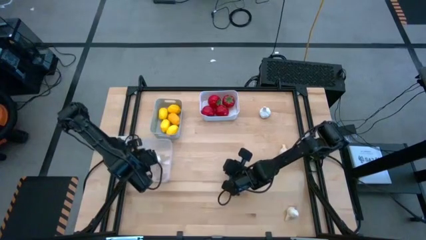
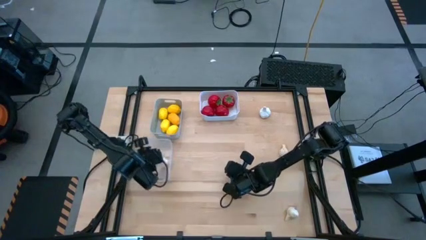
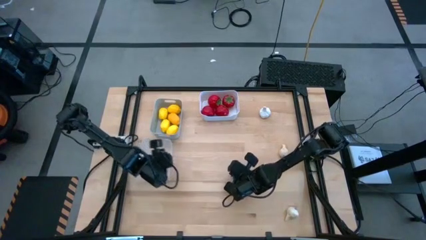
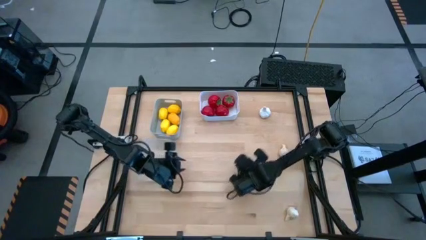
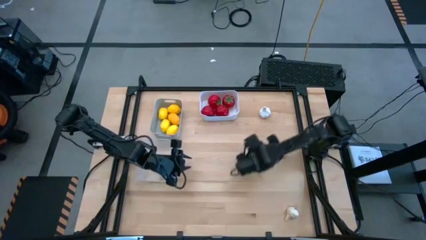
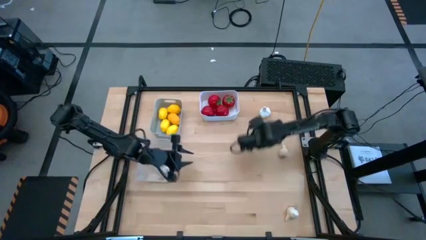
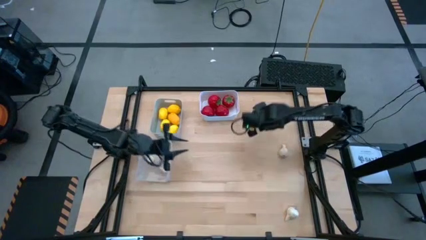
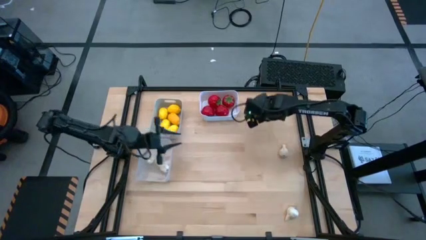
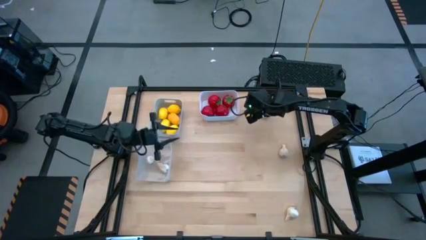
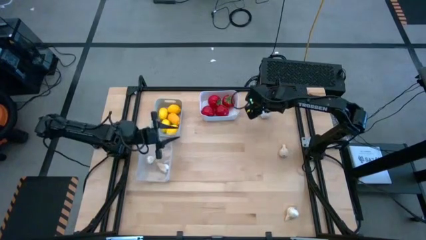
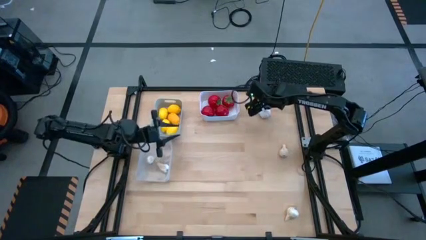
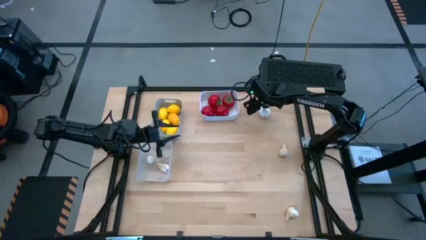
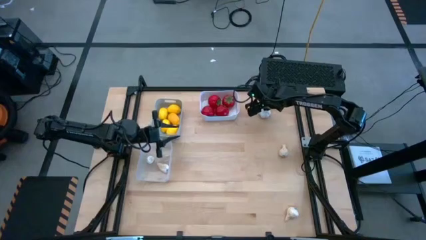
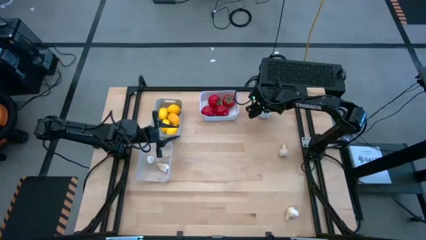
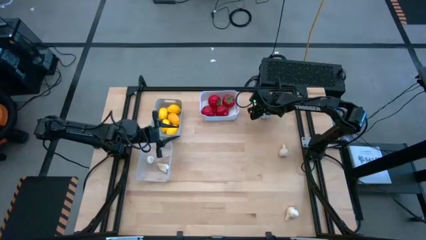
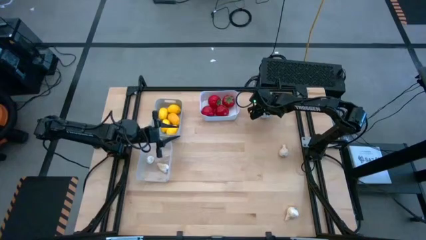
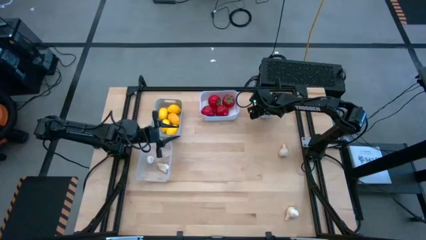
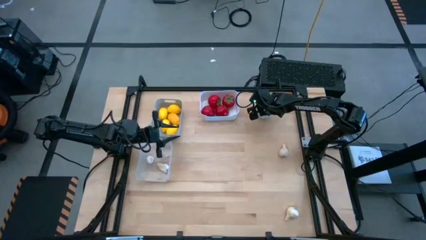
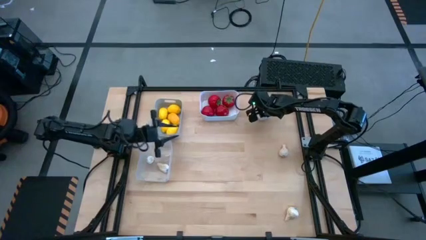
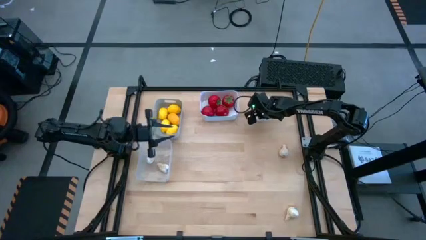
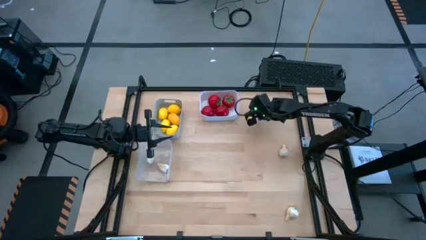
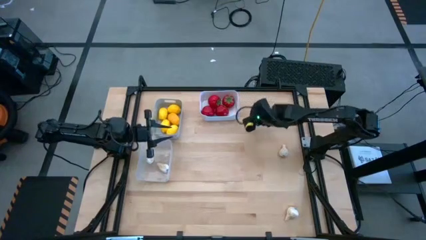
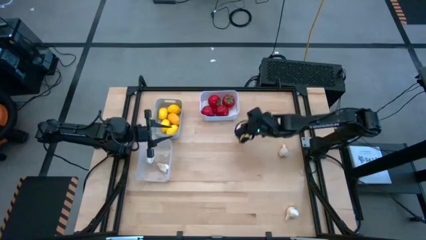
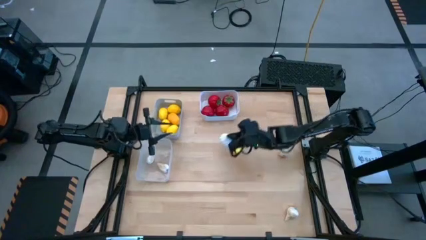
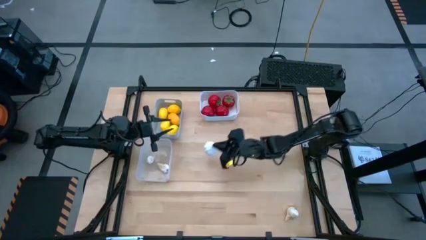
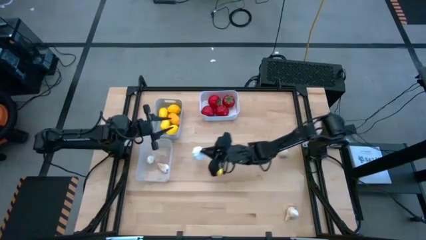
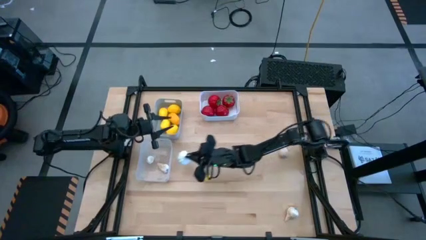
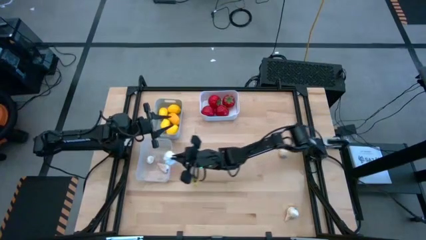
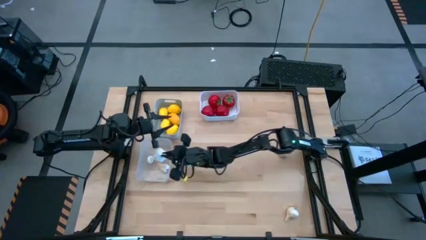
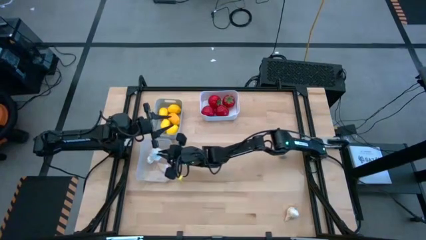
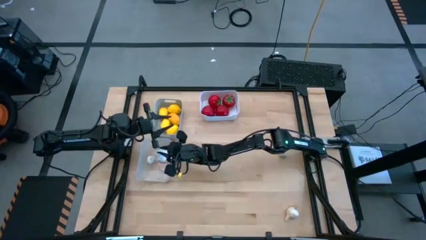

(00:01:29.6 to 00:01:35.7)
Task: Sort produce into baskets
Put the white garlic into the transparent bin

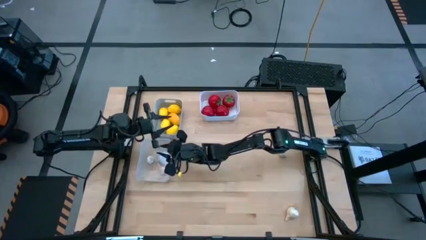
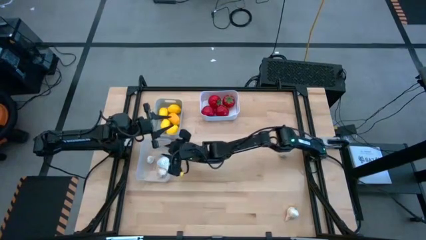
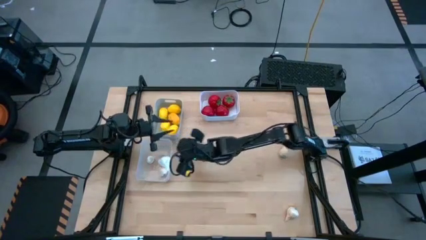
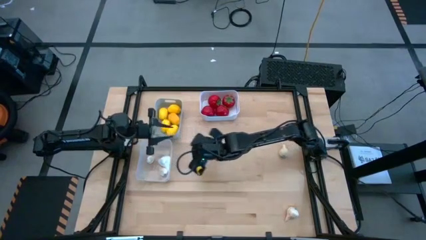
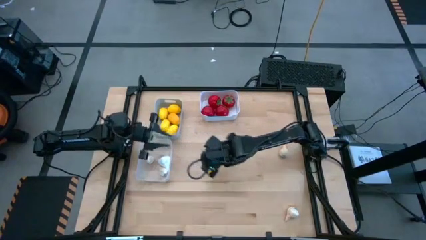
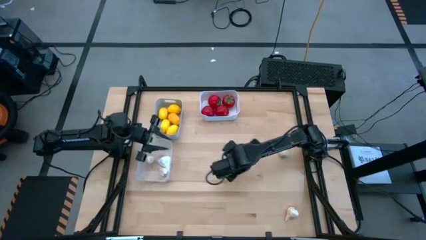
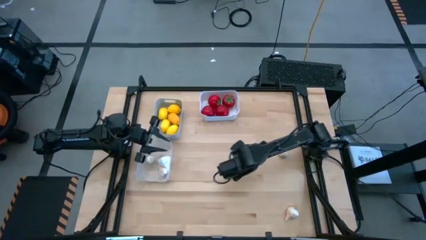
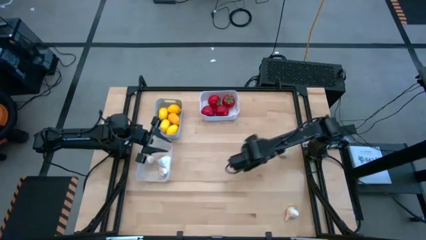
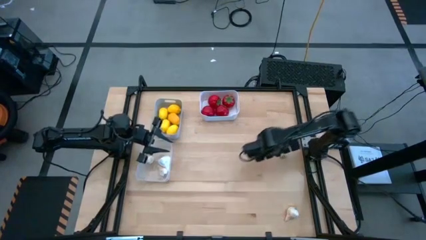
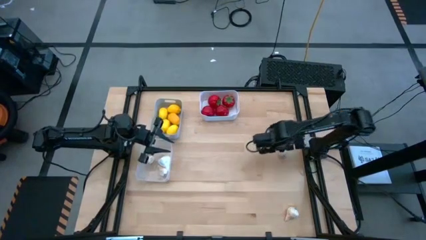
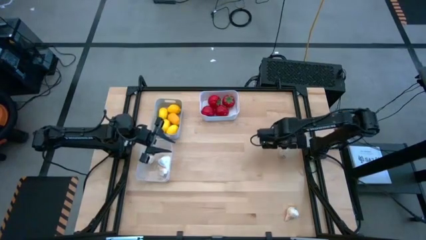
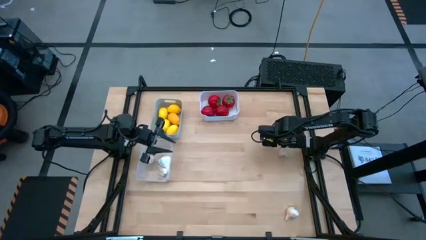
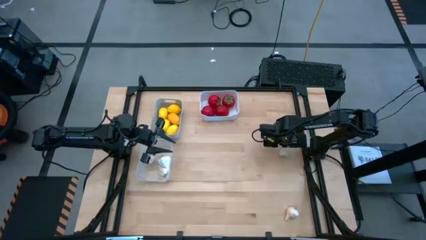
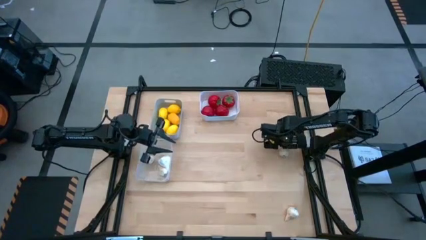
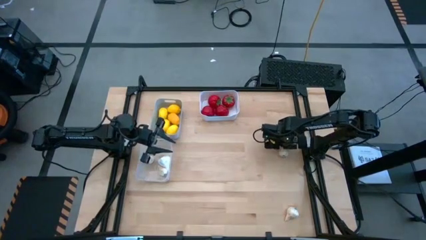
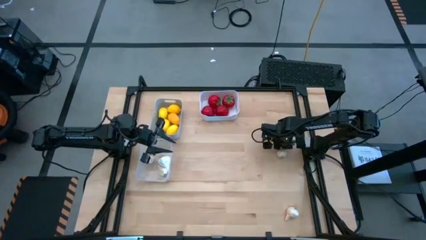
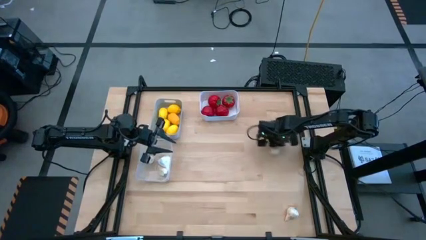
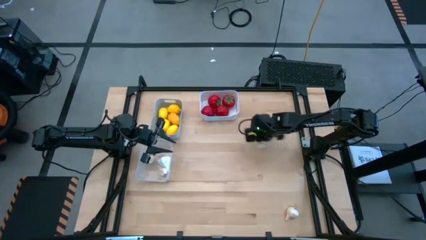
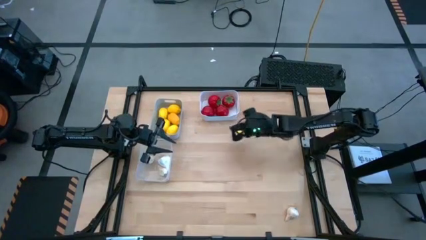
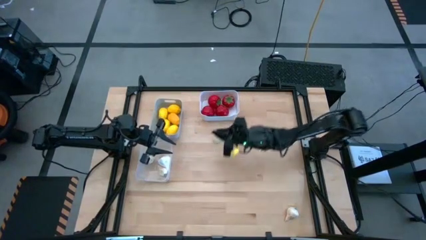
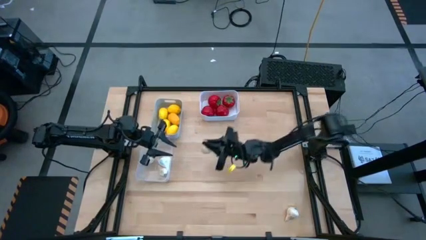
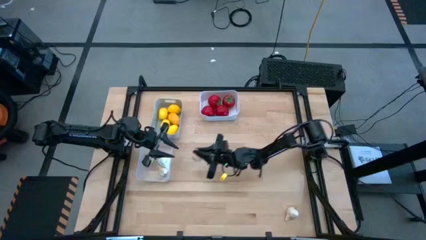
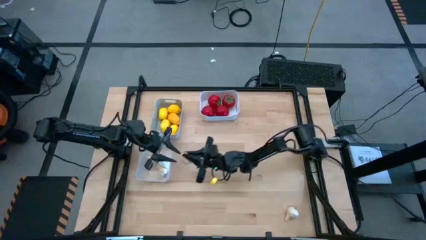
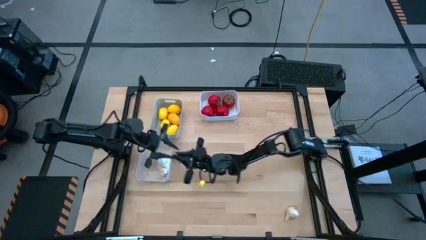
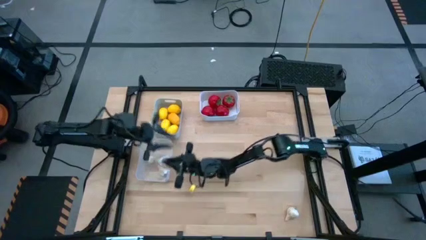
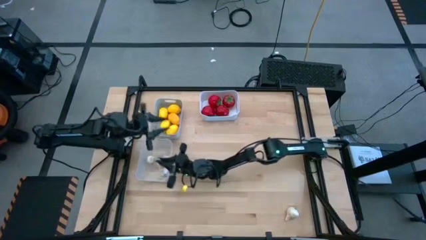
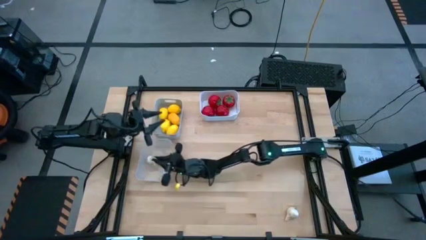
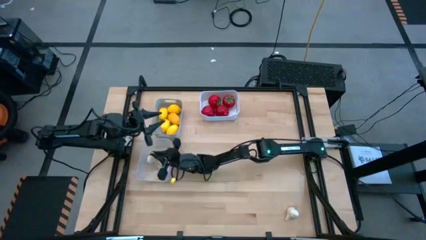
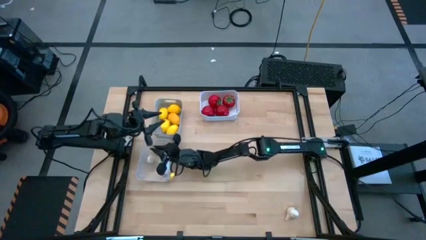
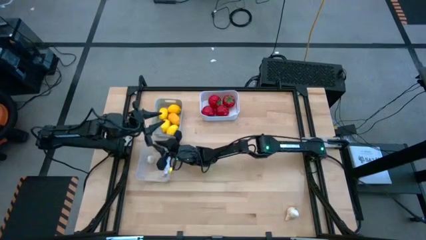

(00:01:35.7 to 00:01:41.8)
Put the white garlic into the transparent bin

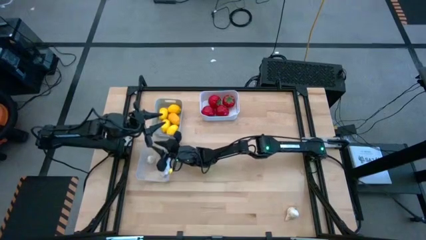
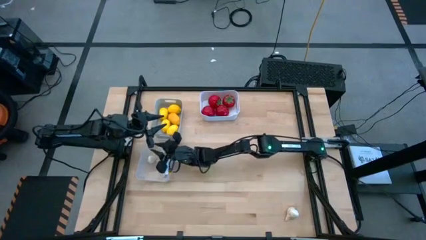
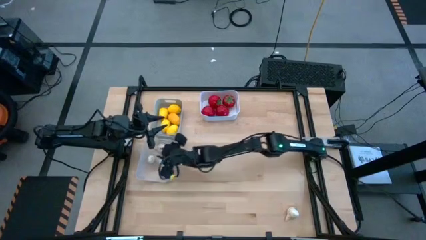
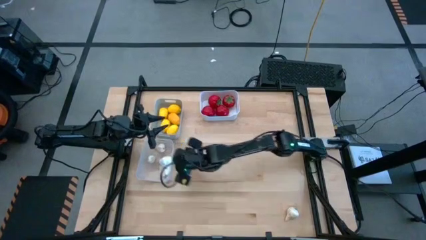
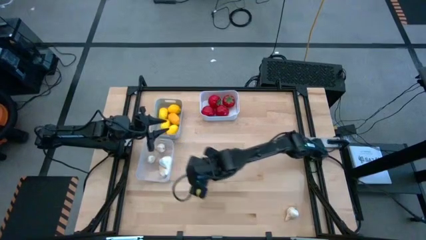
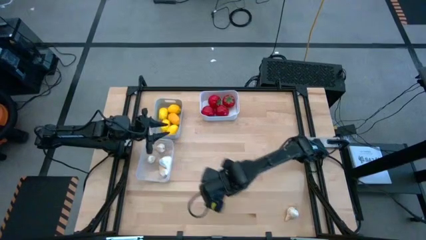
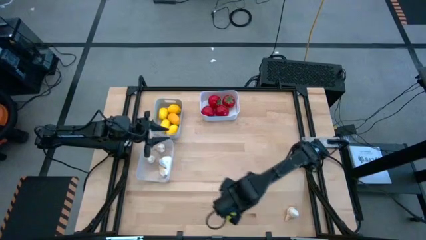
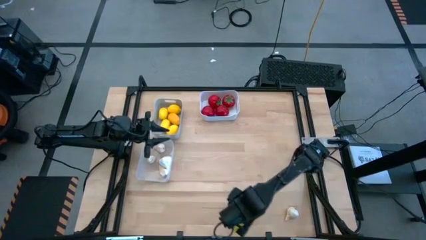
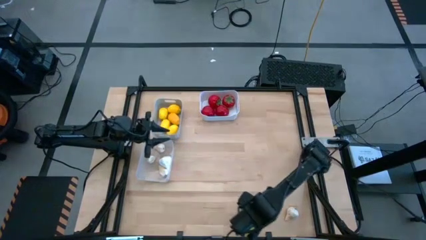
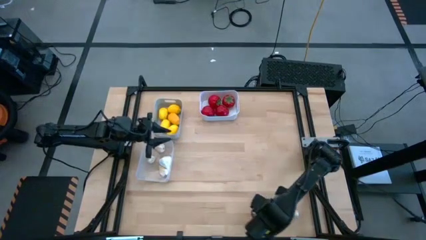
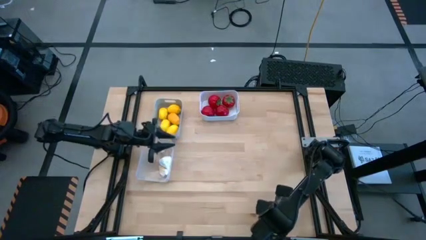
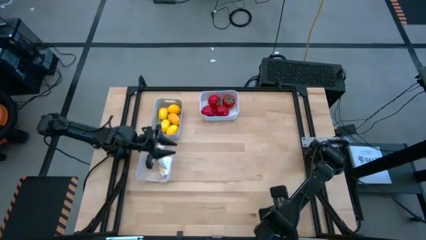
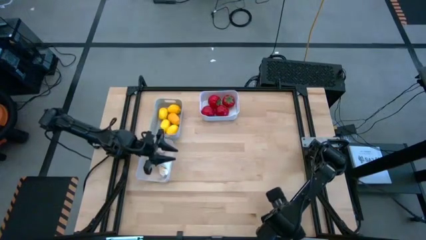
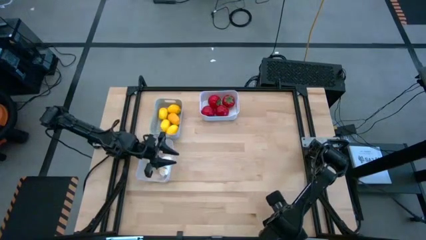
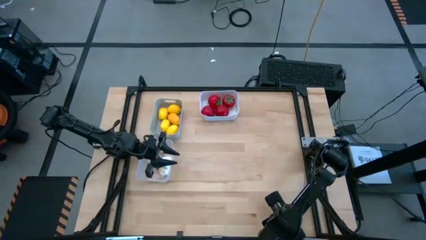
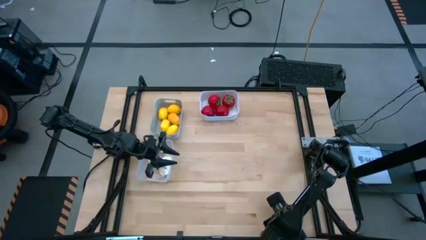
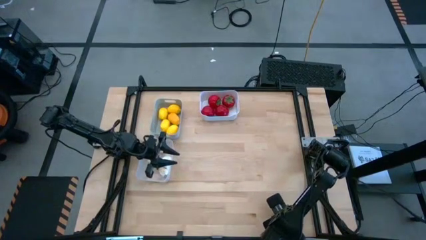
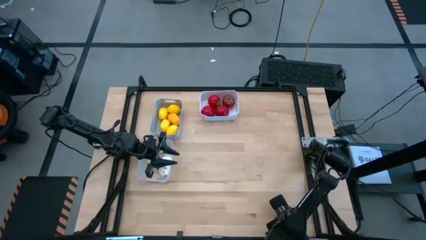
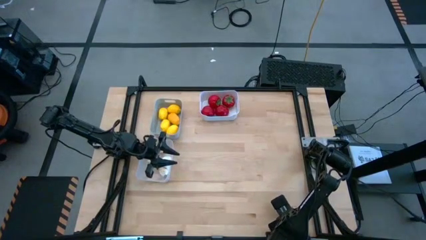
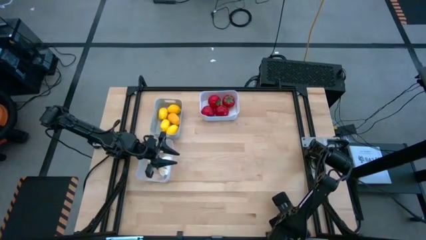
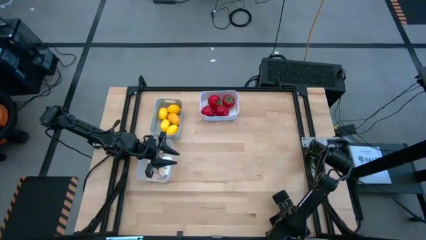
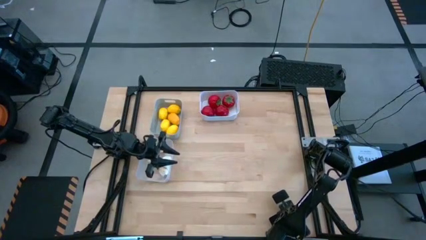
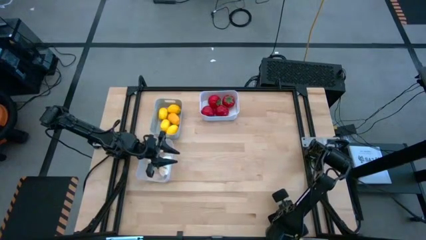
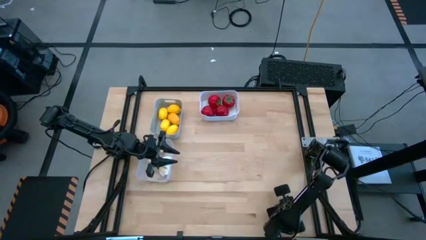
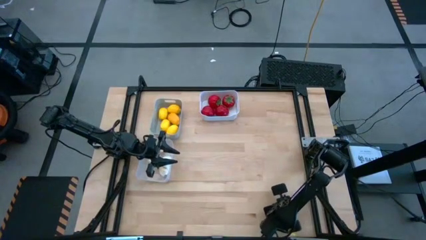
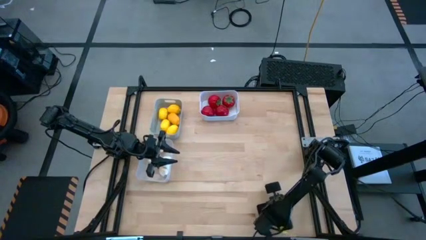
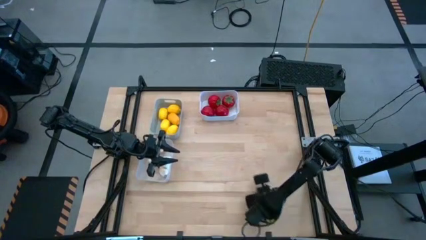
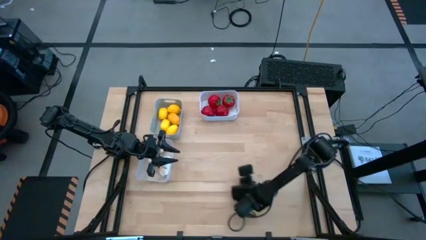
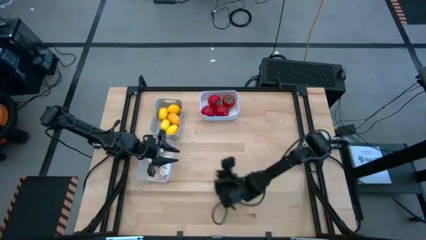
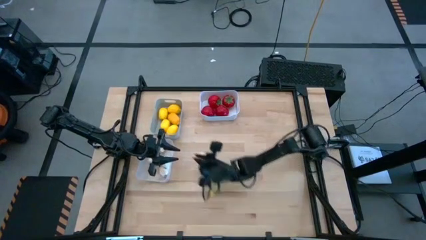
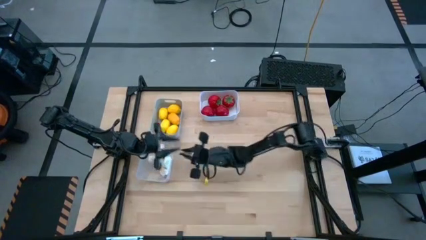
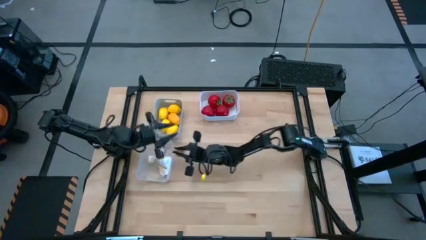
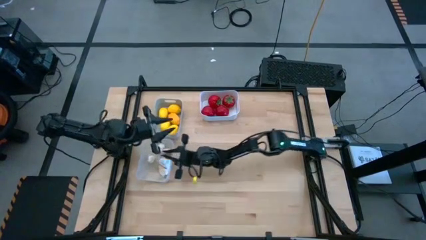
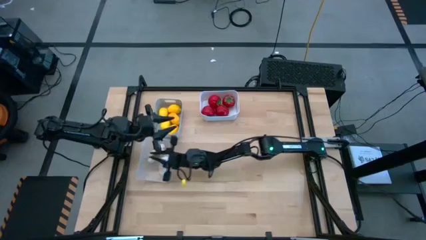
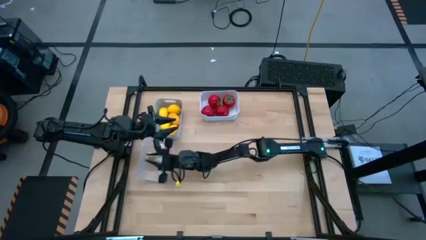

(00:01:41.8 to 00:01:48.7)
Put the white garlic into the transparent bin
